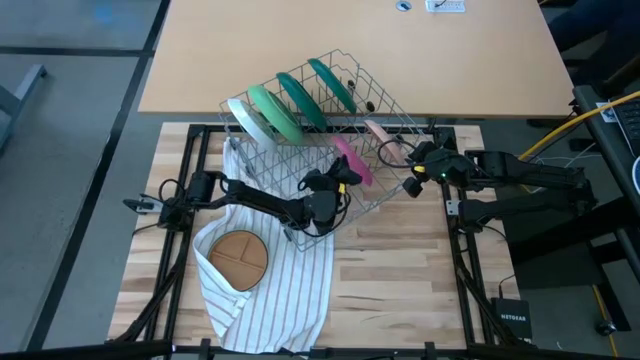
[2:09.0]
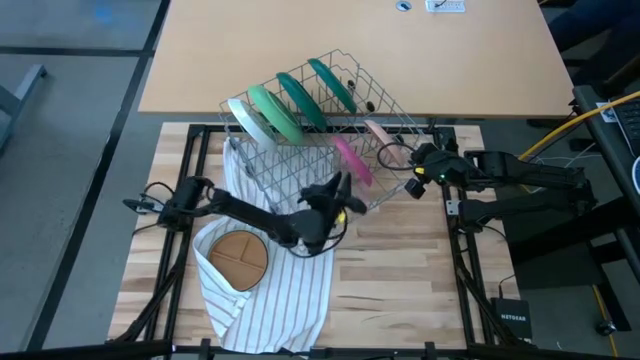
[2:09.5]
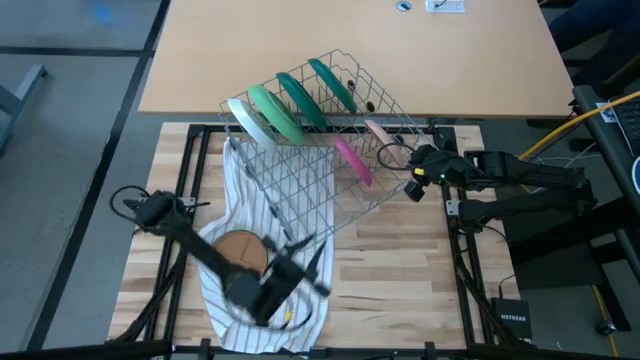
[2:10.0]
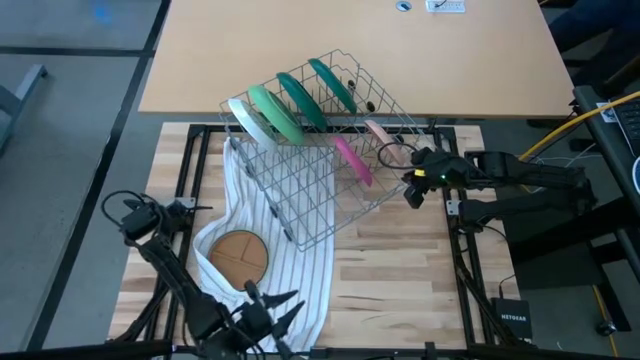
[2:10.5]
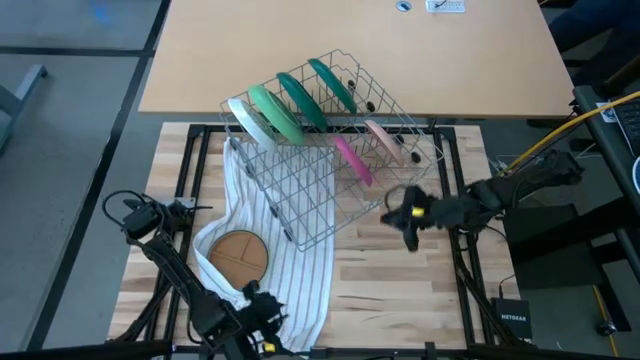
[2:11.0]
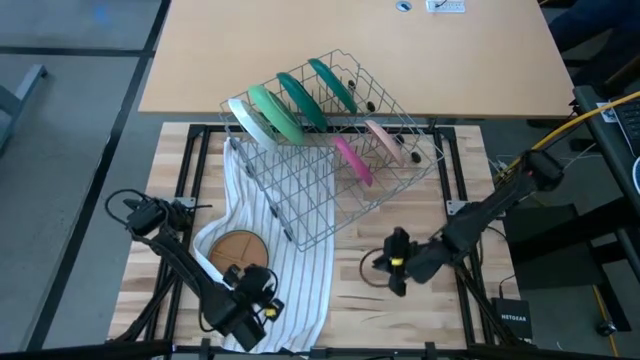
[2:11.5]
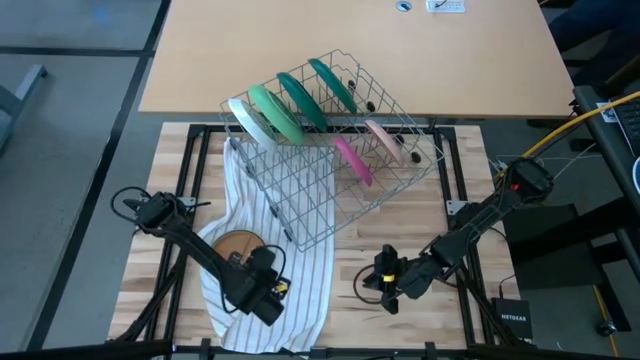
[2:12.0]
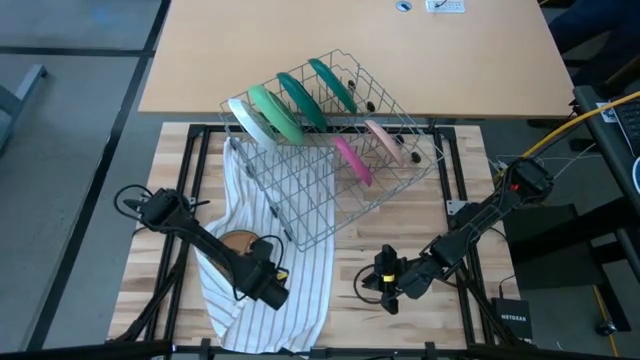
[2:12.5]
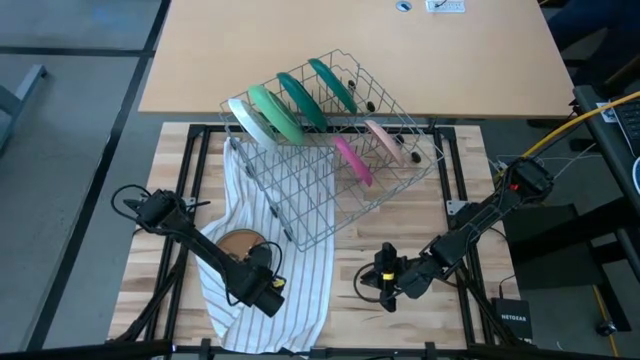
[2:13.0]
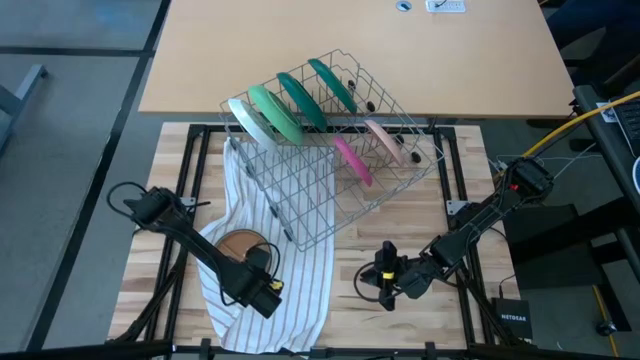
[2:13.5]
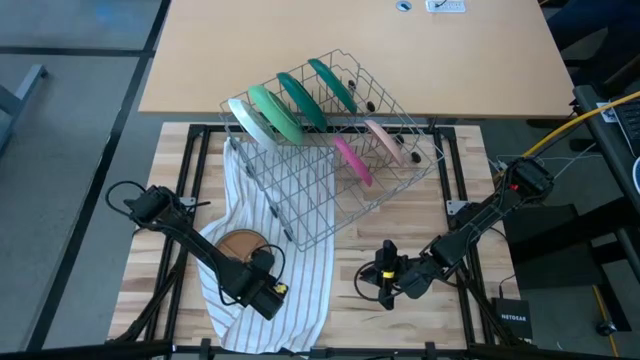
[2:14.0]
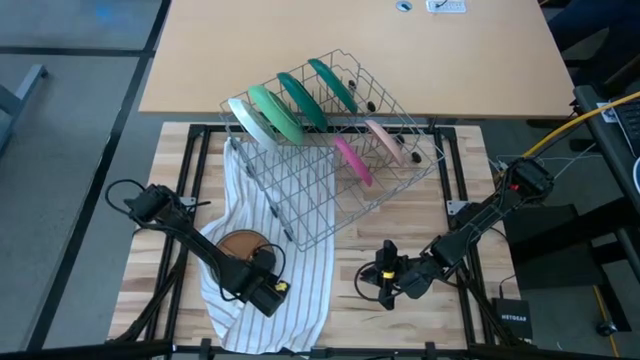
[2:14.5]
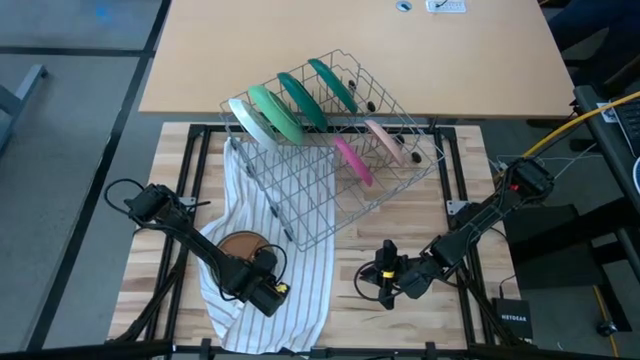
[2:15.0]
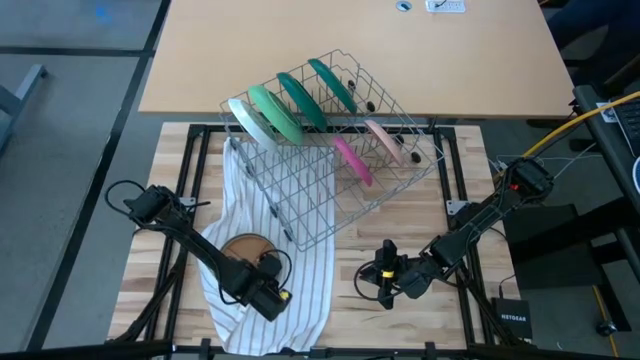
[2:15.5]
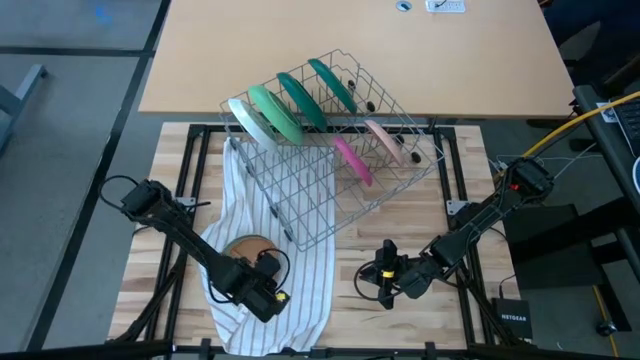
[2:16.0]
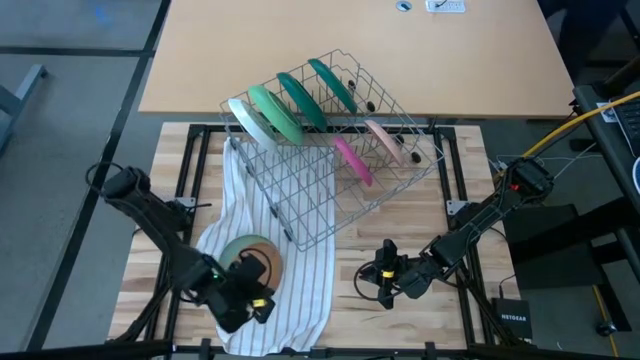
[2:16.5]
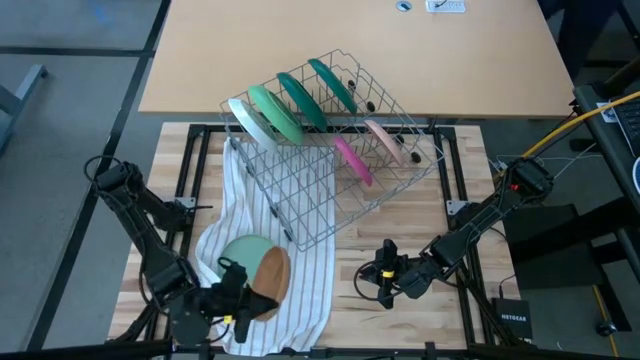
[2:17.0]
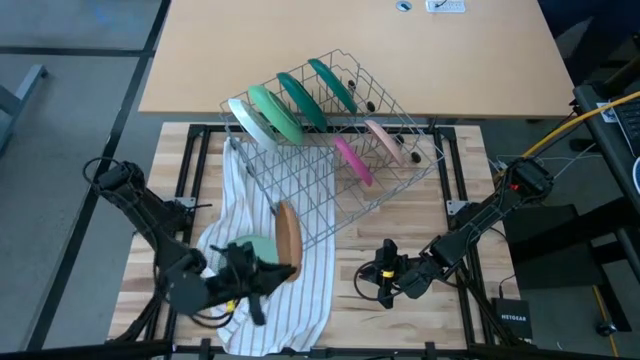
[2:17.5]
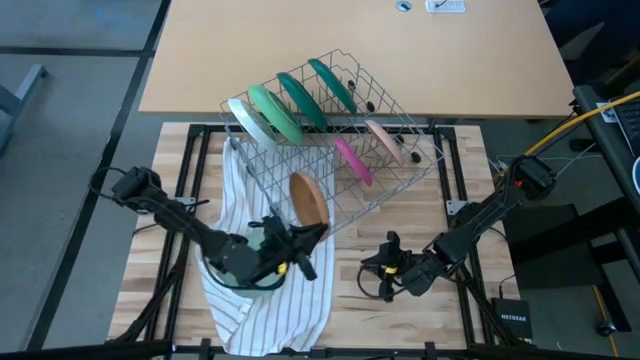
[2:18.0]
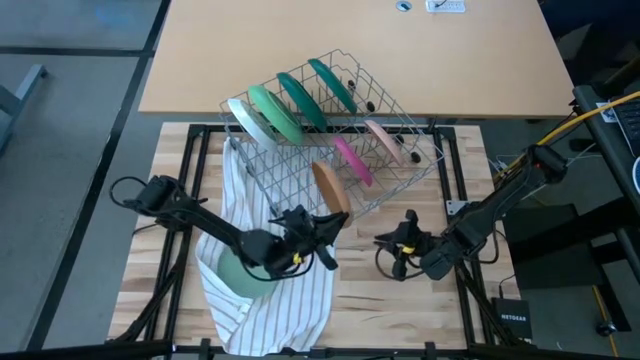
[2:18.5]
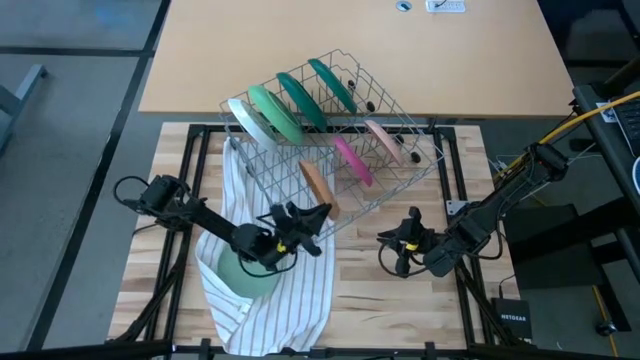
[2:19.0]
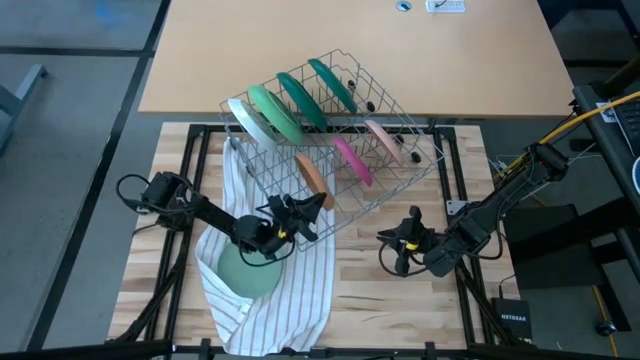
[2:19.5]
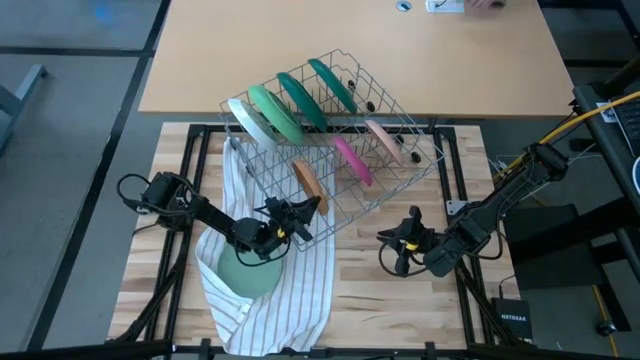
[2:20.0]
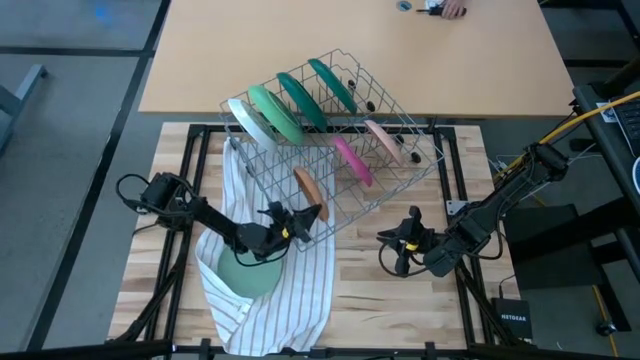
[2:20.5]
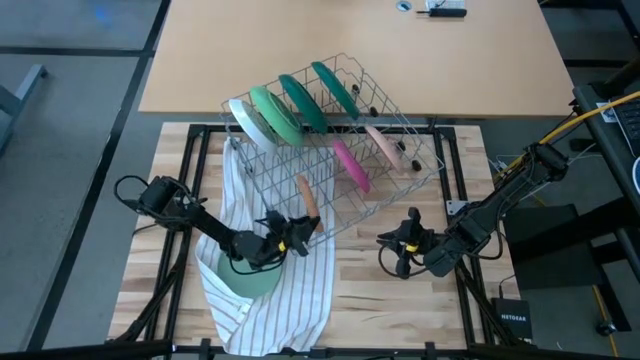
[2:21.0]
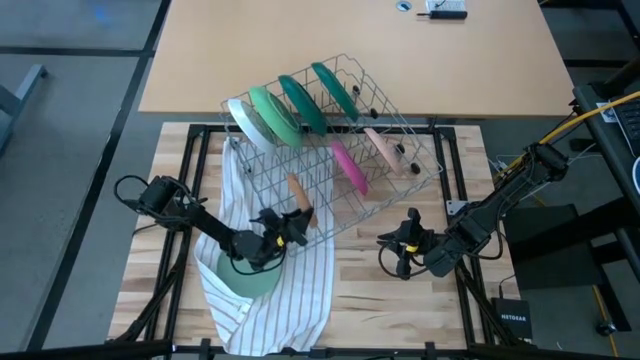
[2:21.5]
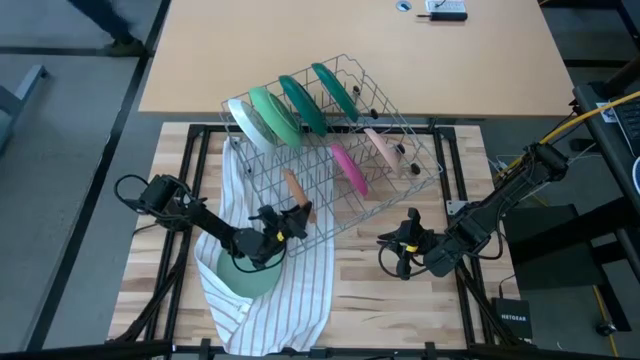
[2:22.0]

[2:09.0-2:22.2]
Task: Sort dishes
Put the brown plate in the dish rack

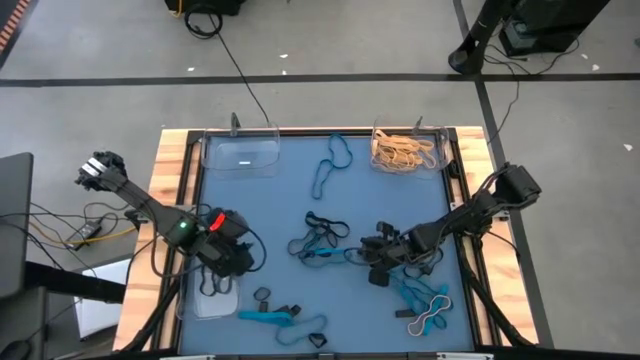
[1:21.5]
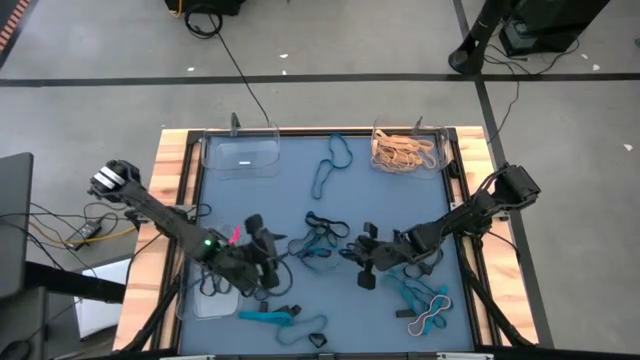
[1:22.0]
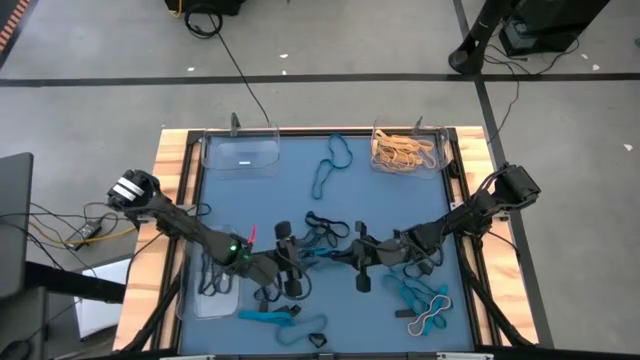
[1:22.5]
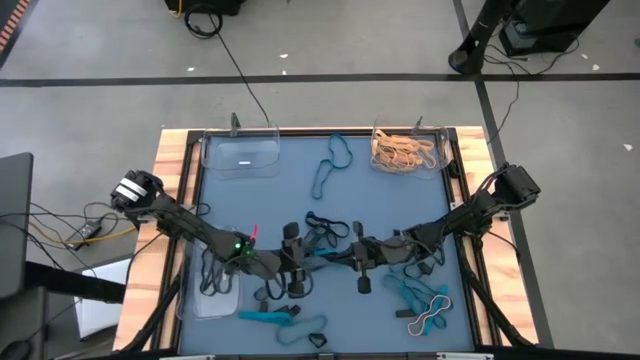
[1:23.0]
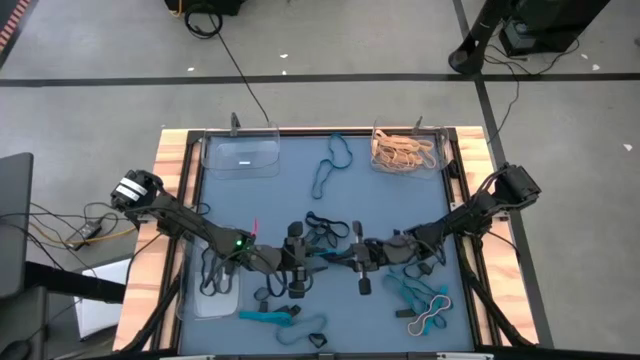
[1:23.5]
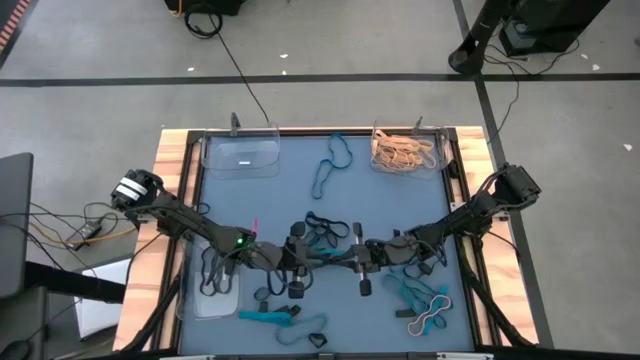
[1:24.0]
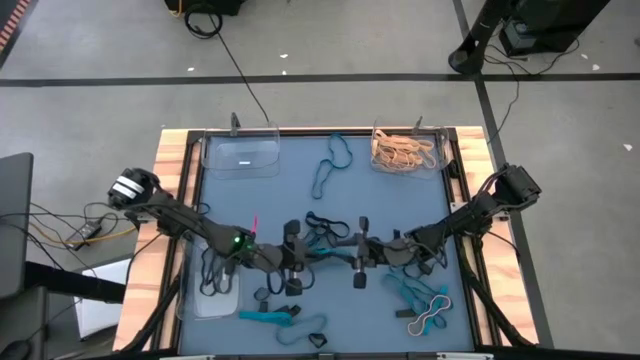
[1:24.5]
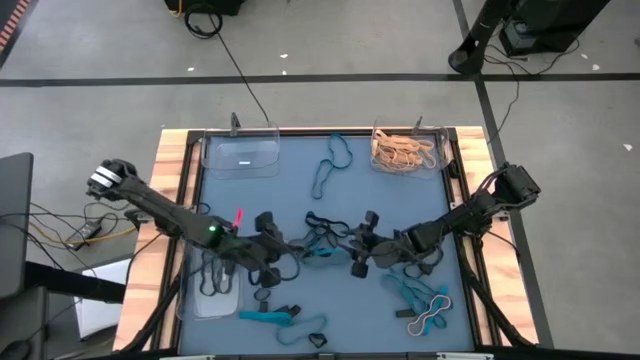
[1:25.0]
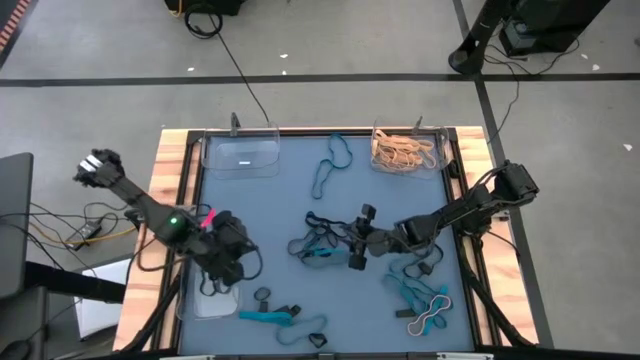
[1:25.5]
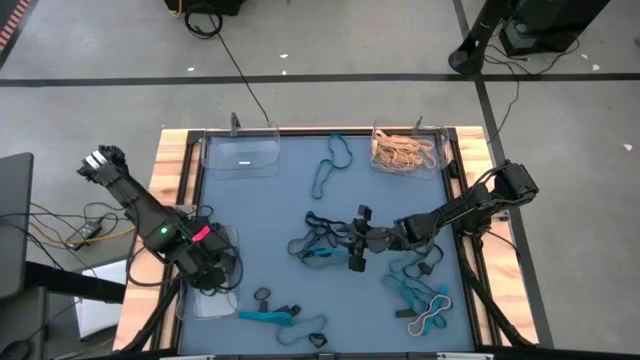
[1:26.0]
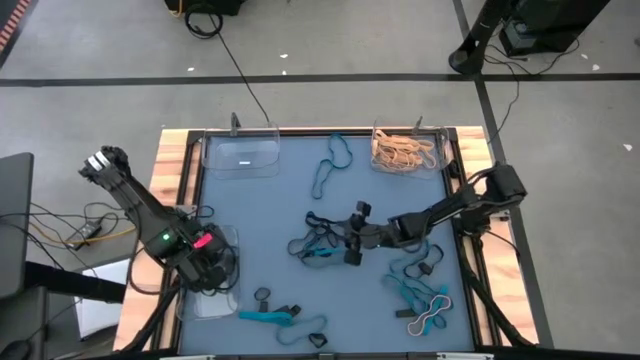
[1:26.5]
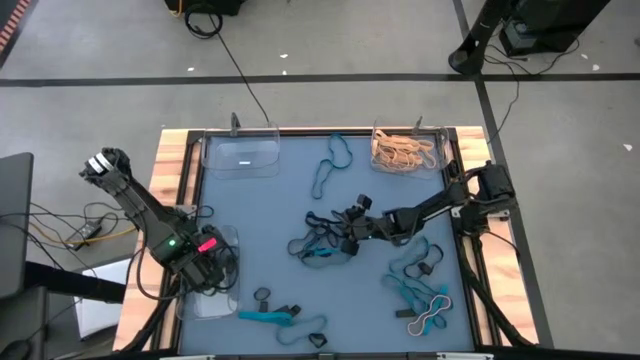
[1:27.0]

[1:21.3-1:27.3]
Task: Sort rubber bands into baskets
Put the small black rubber band into the bottom left transparent bin
